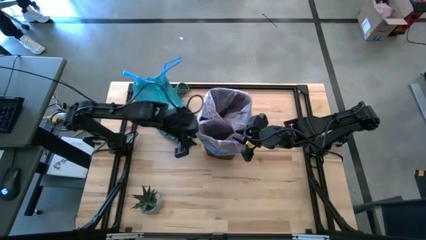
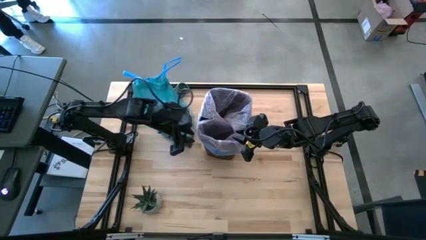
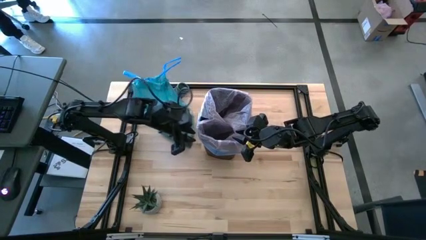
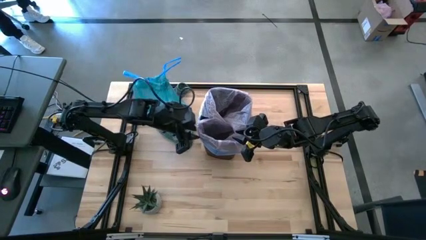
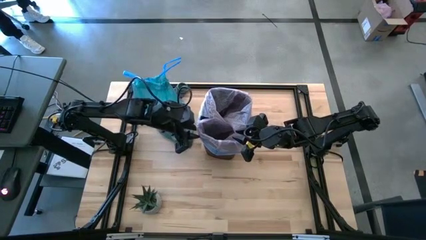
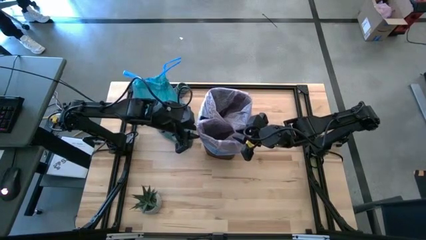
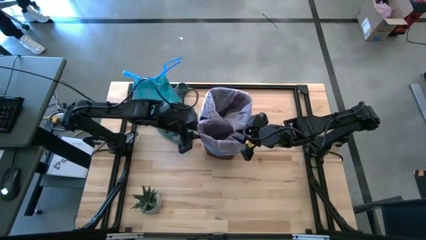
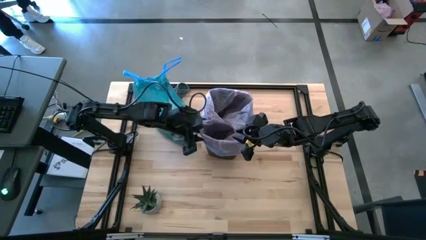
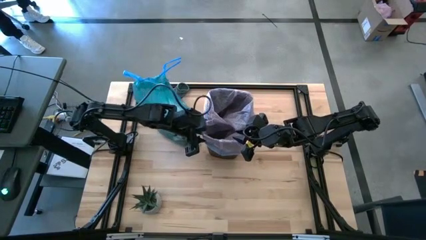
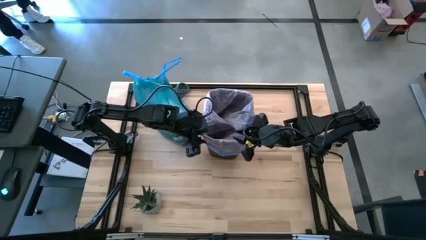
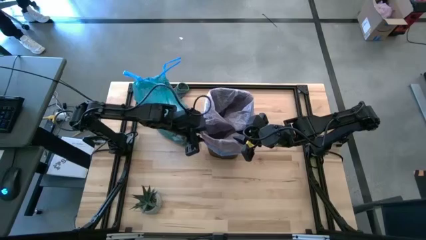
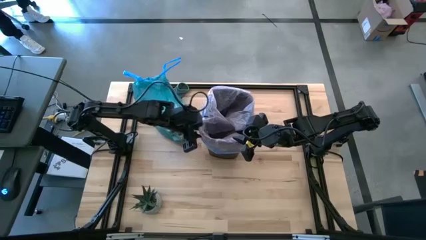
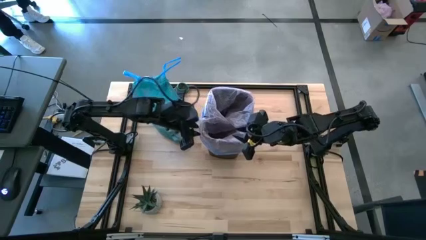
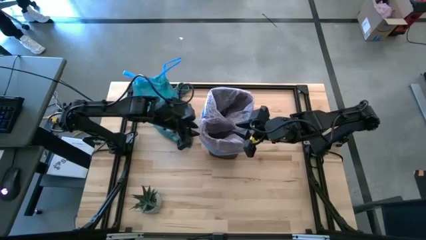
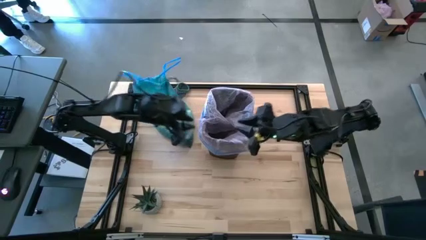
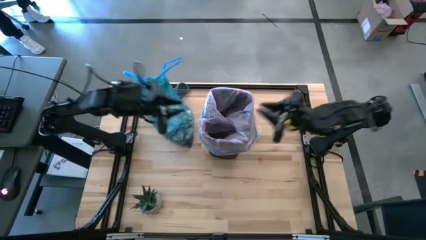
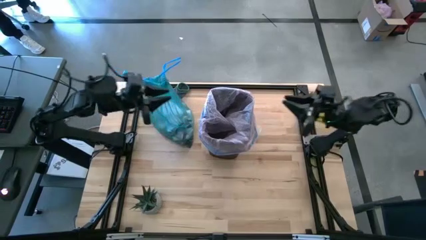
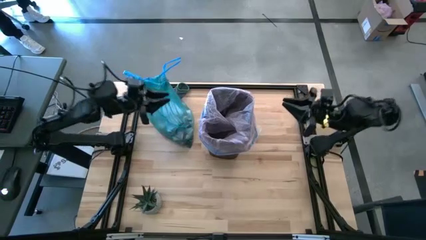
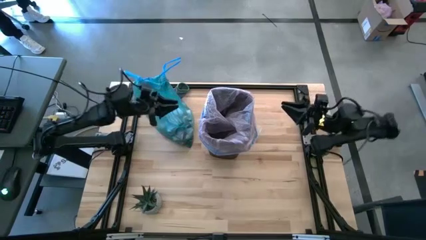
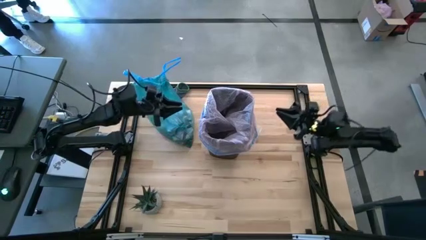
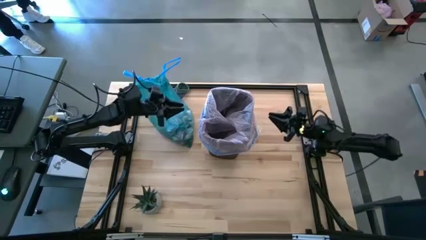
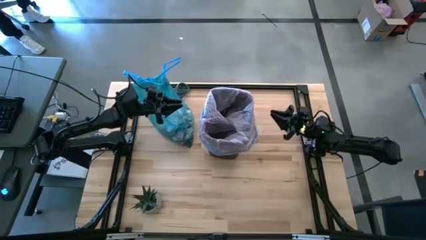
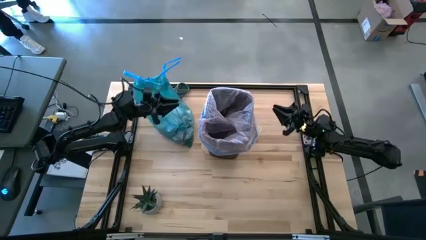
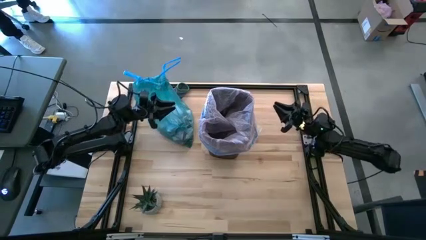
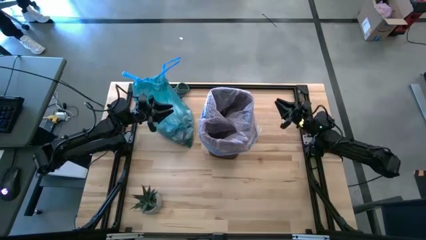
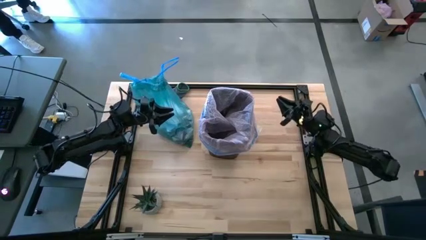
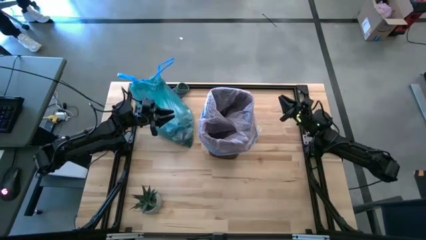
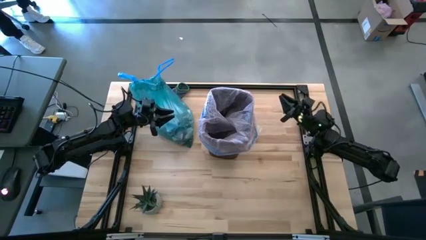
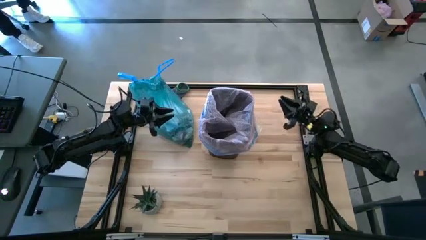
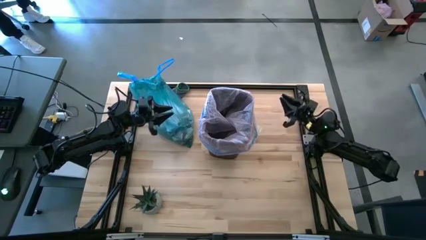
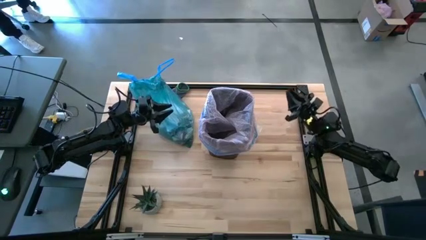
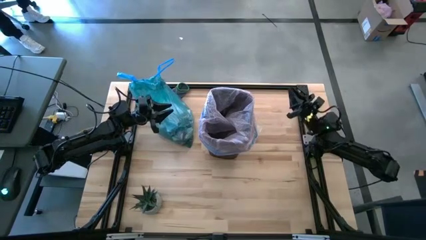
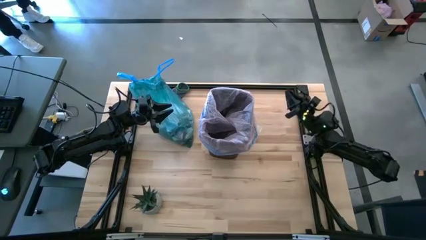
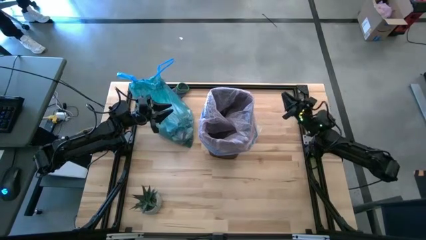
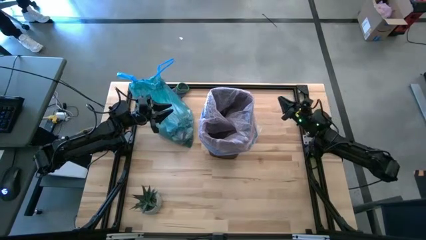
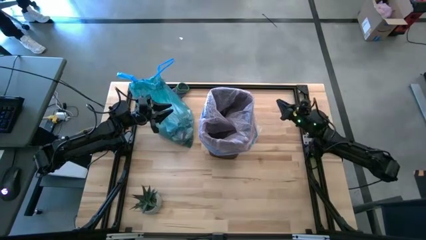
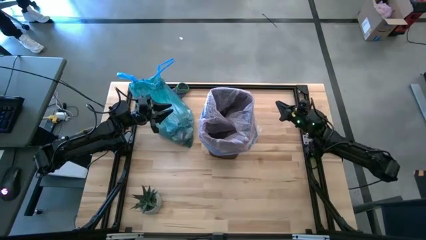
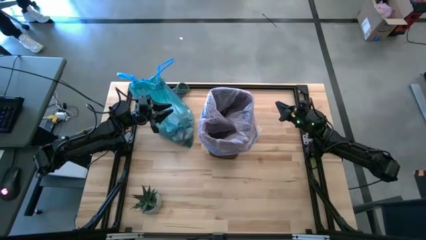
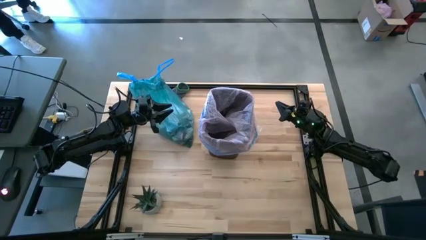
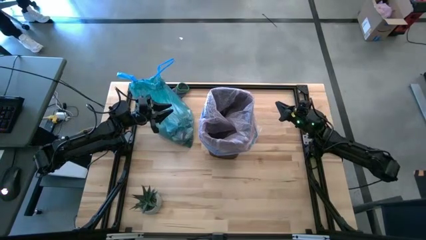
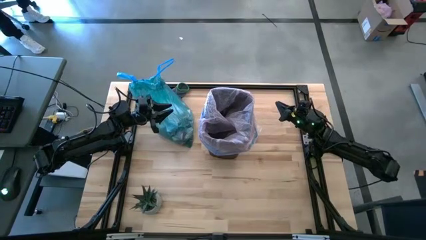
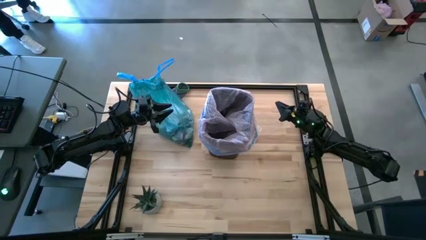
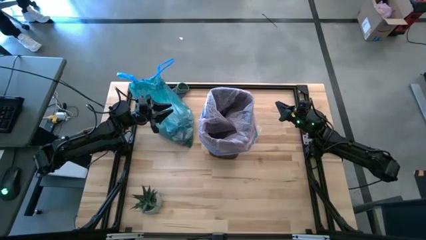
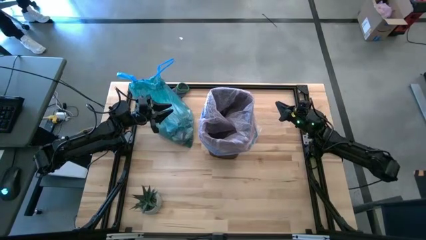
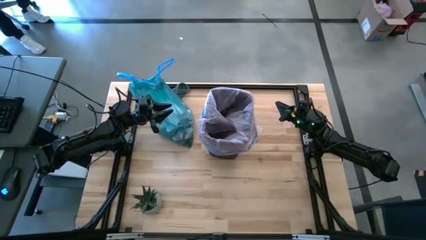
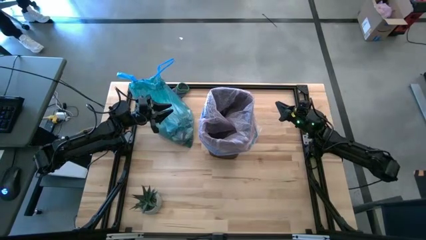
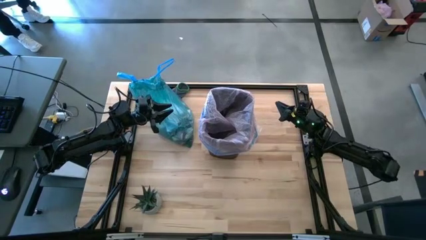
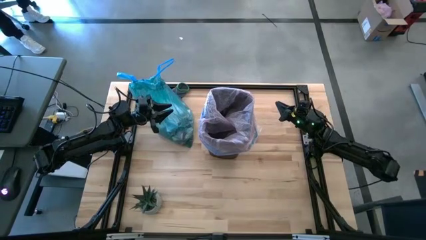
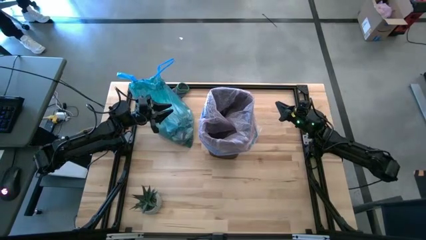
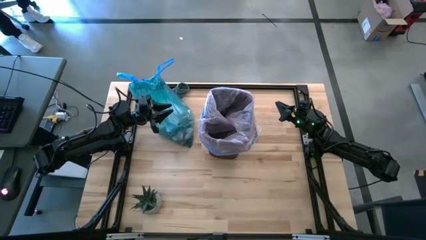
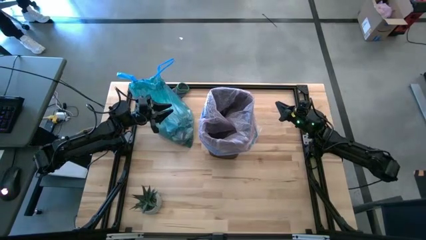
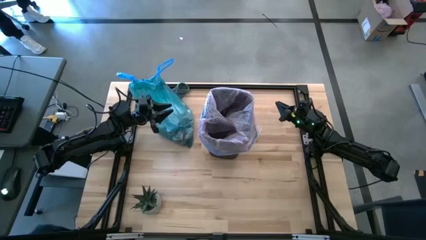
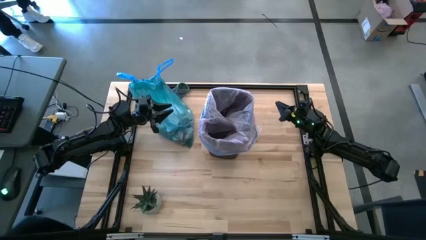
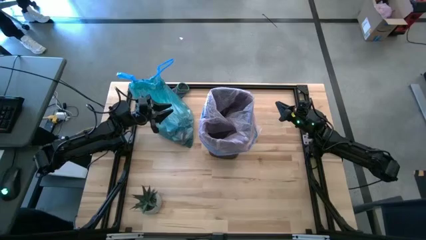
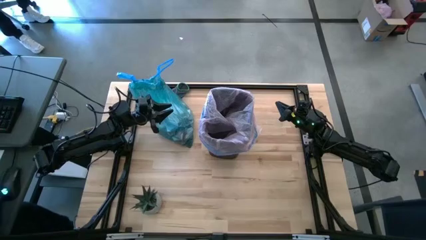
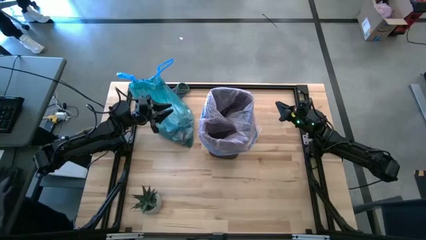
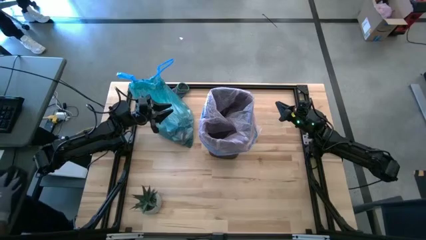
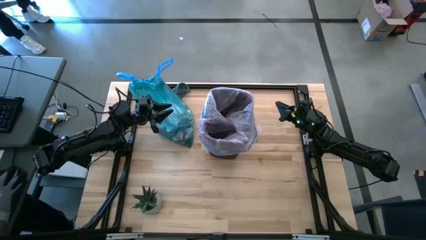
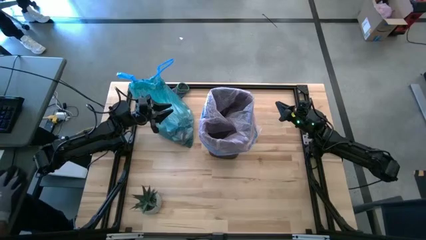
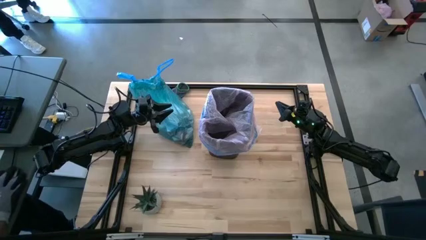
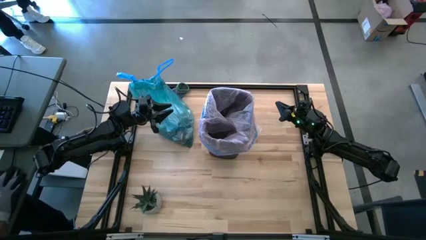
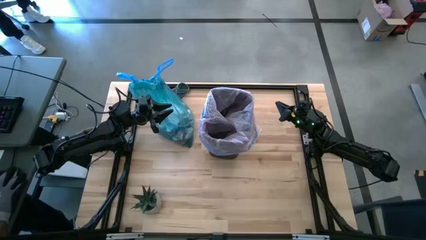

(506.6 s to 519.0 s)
Task: place trash/remove bag and relplace
Return to Home Position
